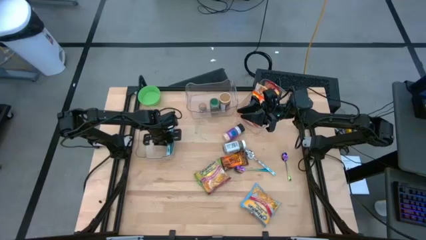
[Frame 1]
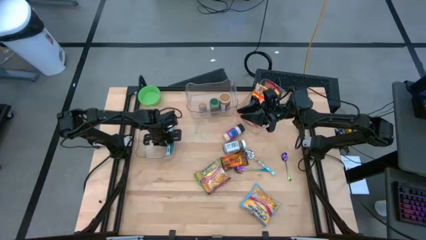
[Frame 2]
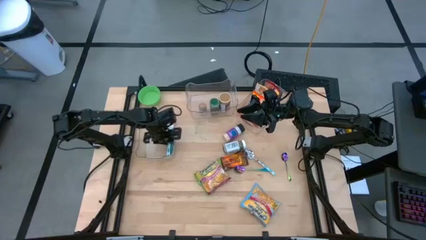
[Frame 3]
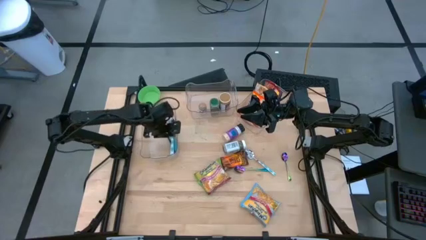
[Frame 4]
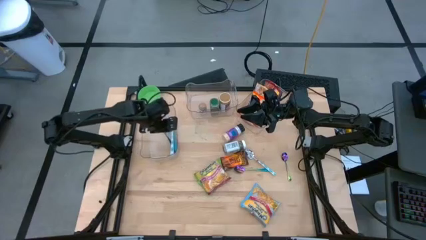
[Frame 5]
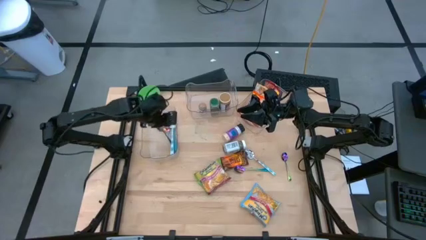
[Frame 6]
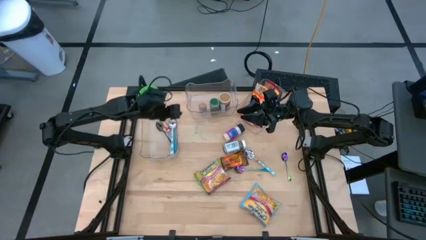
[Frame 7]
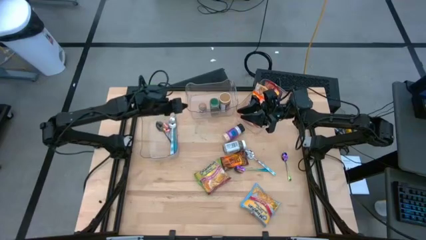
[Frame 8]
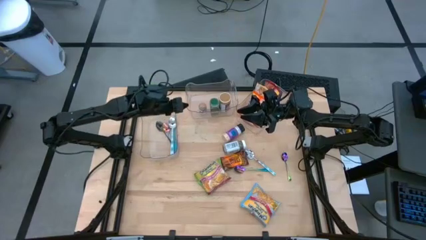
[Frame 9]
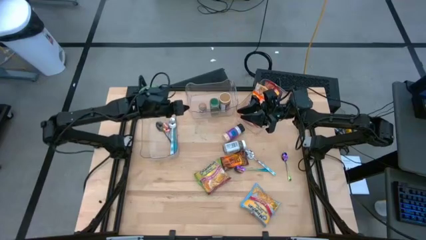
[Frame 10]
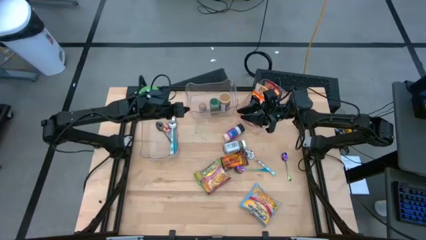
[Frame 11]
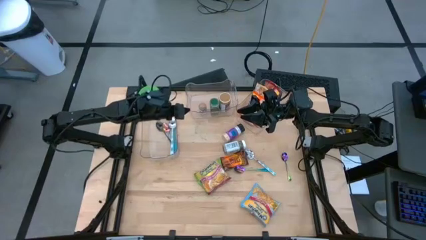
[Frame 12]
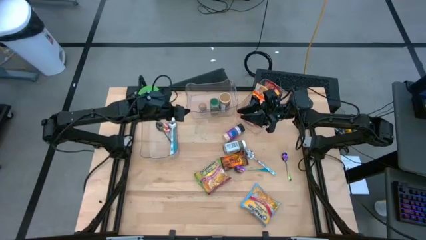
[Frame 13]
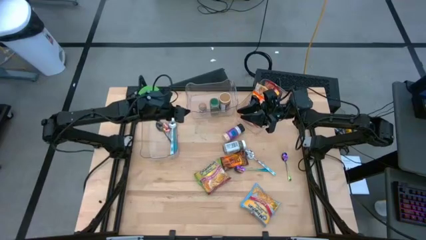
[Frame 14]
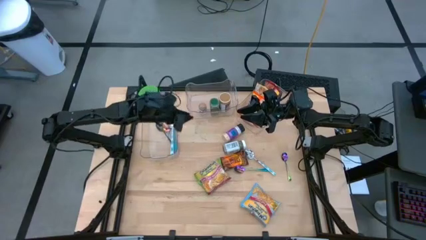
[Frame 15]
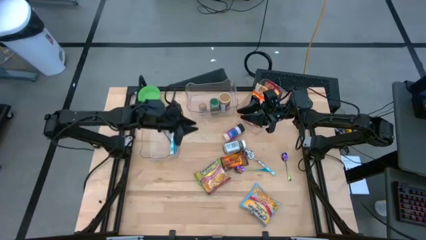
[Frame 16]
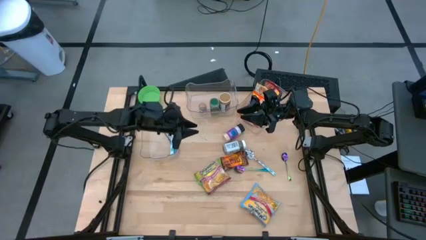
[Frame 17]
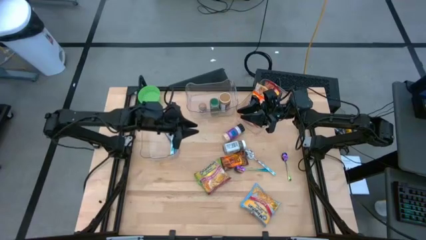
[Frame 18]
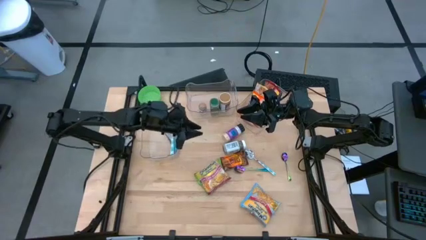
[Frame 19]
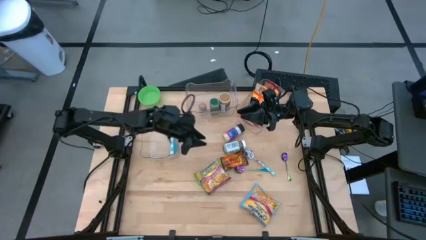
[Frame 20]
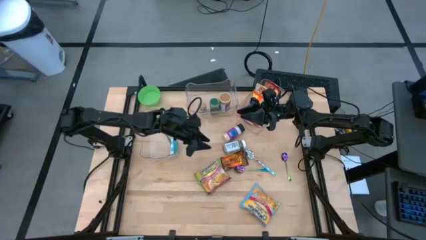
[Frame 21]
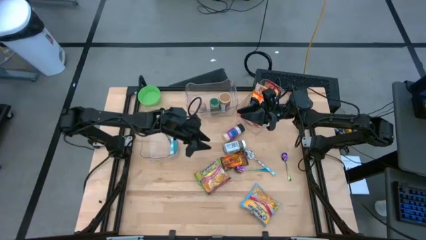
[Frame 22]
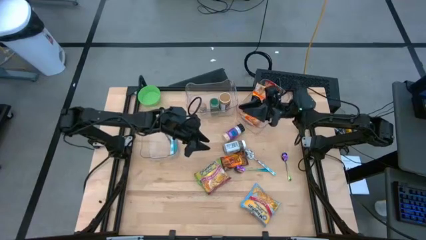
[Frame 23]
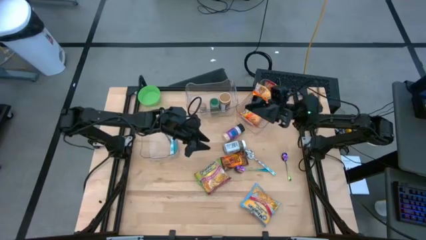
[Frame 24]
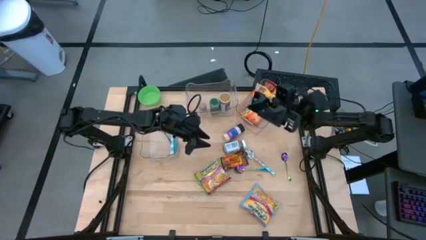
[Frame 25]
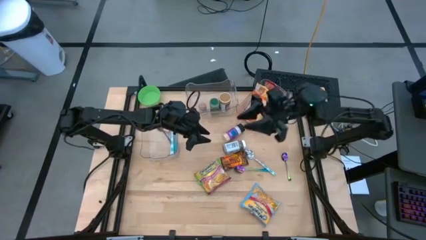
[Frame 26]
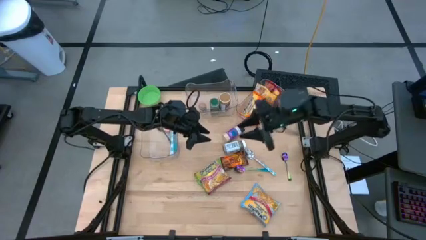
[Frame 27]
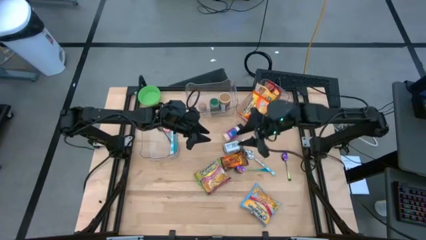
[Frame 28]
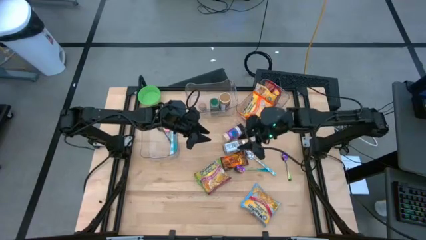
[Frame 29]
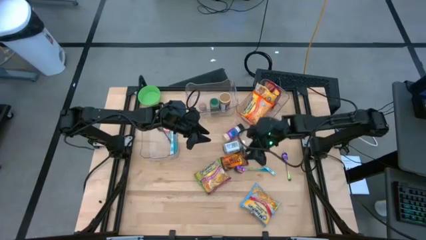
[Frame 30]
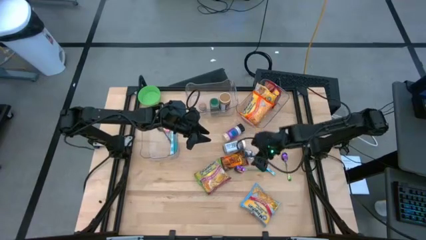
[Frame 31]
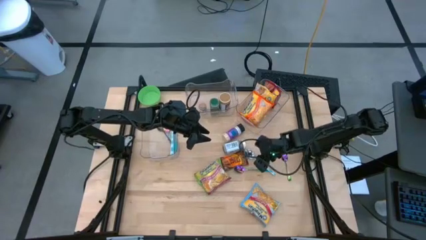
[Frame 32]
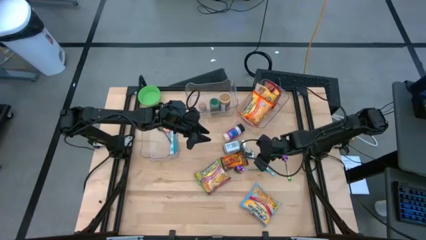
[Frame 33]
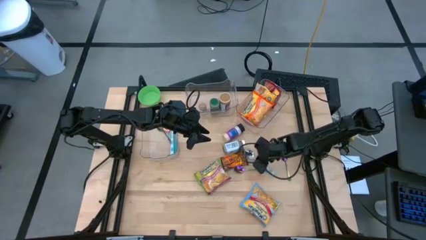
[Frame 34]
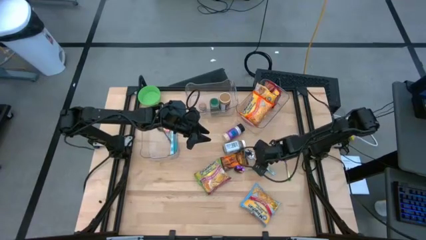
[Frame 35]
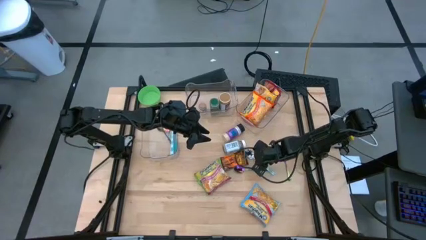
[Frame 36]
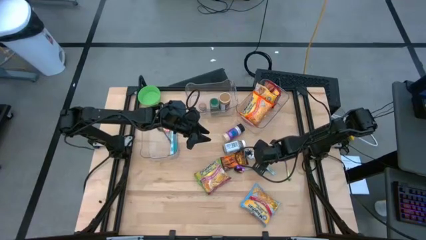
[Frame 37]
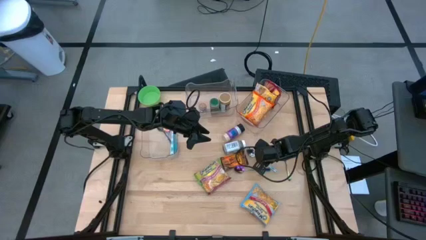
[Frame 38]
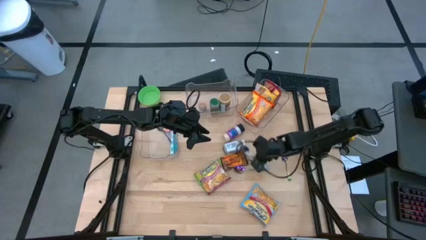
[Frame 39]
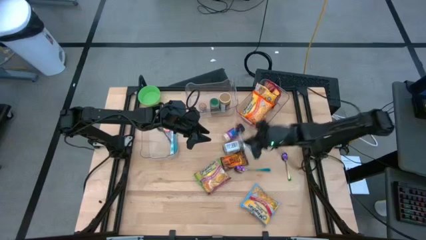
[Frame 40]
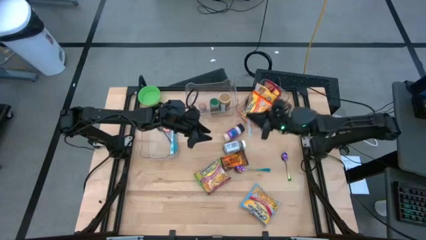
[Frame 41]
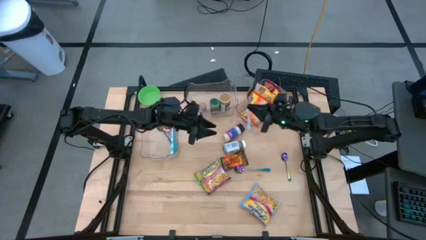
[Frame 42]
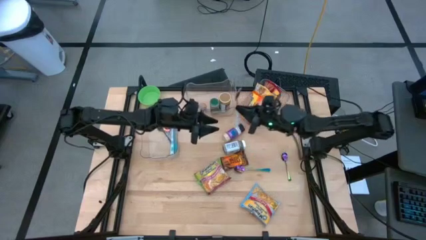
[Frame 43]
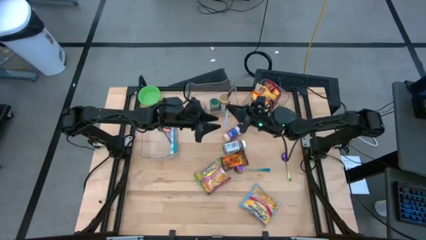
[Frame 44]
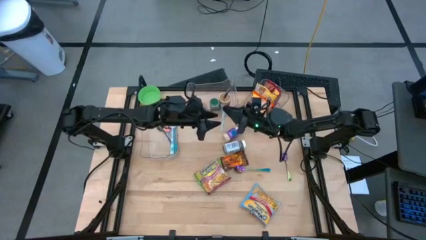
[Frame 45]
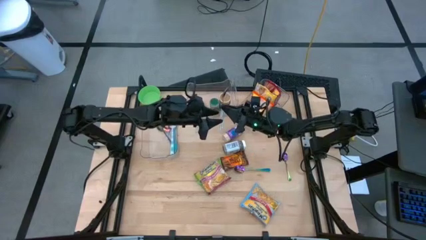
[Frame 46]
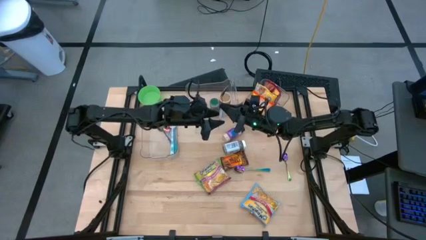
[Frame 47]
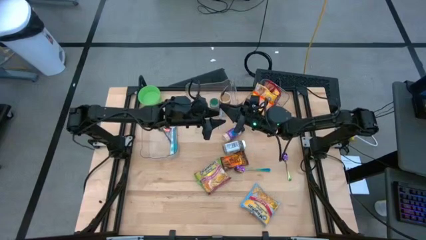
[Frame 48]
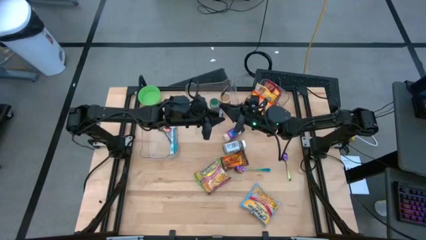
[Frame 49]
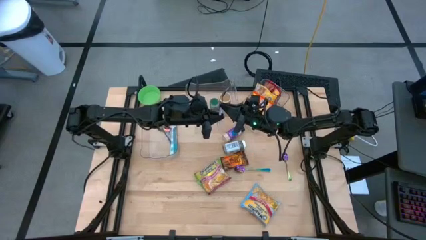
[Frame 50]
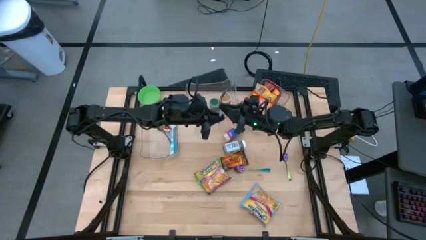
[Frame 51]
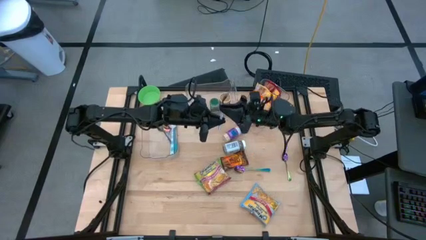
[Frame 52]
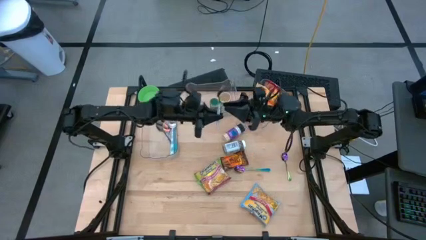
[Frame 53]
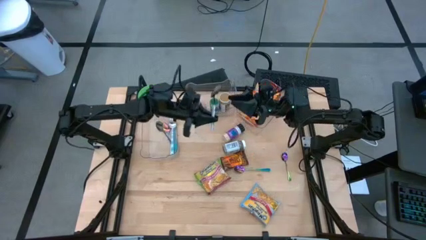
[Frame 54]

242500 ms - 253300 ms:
Task: Pick & Place Food Item
Put the white patterned spoon into the left transparent bin

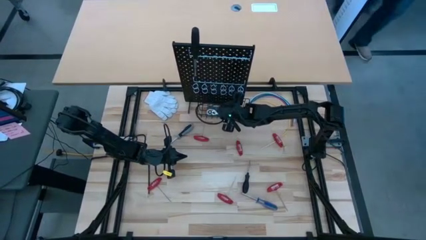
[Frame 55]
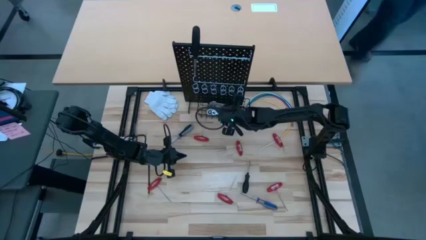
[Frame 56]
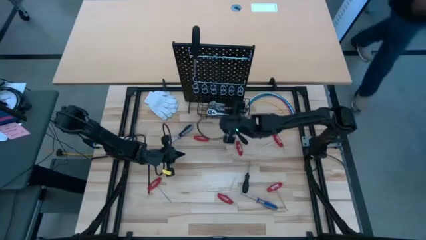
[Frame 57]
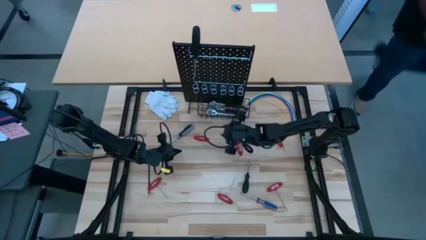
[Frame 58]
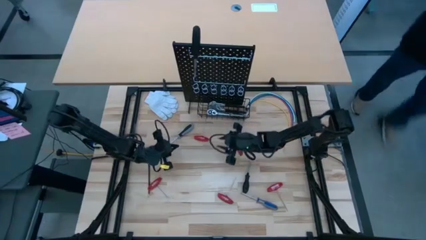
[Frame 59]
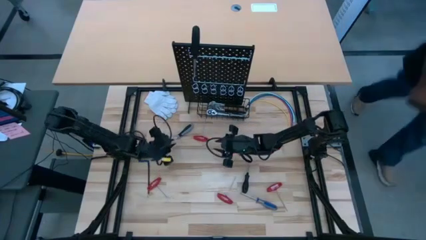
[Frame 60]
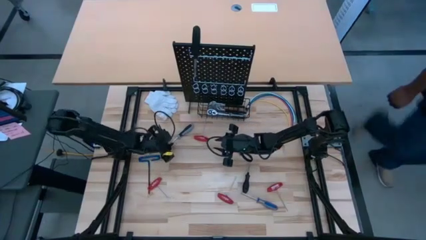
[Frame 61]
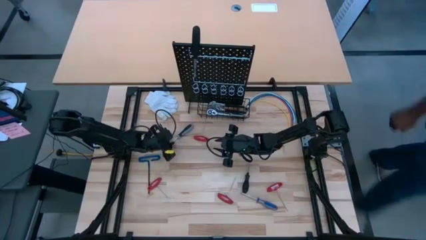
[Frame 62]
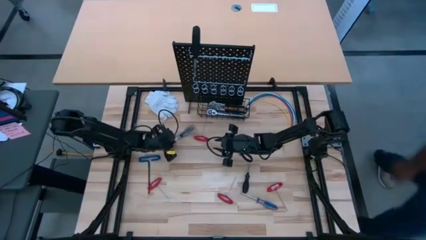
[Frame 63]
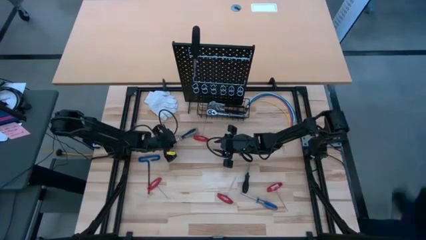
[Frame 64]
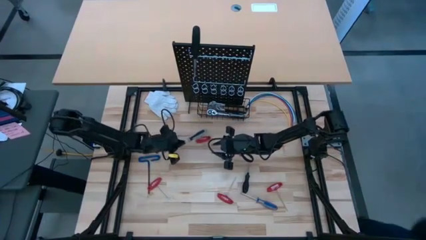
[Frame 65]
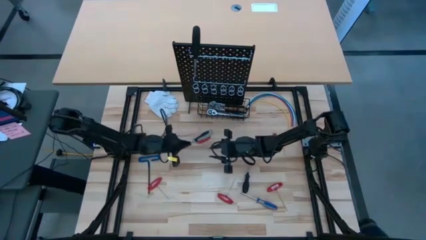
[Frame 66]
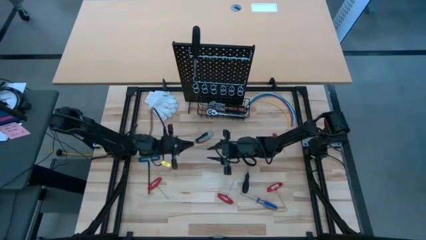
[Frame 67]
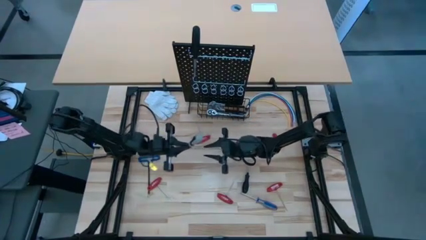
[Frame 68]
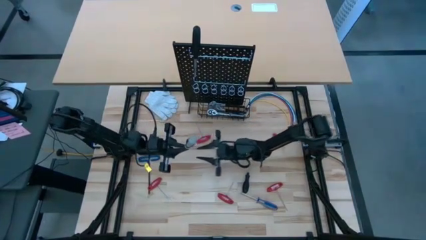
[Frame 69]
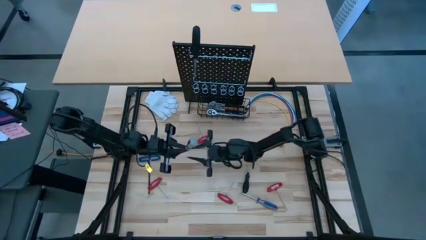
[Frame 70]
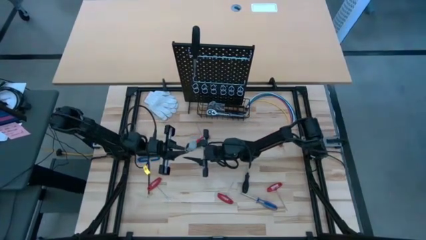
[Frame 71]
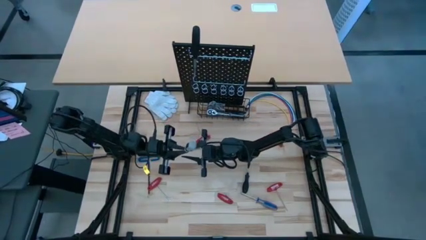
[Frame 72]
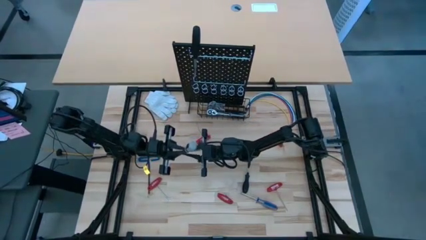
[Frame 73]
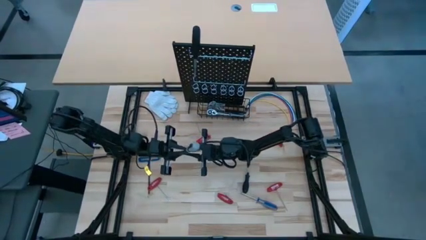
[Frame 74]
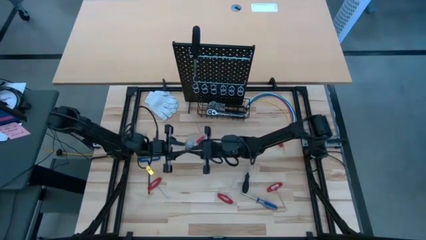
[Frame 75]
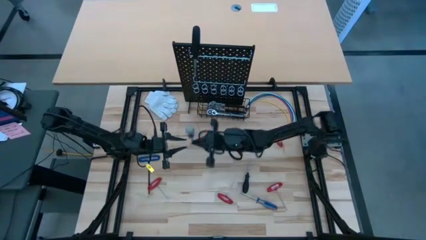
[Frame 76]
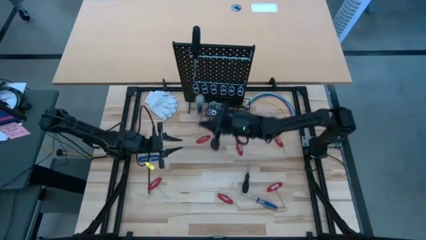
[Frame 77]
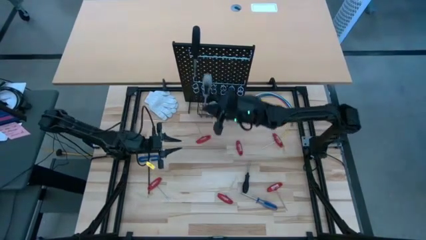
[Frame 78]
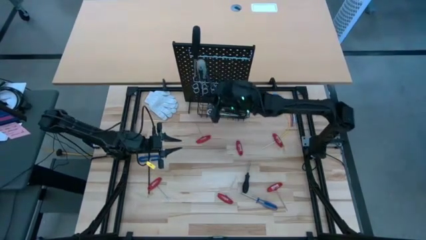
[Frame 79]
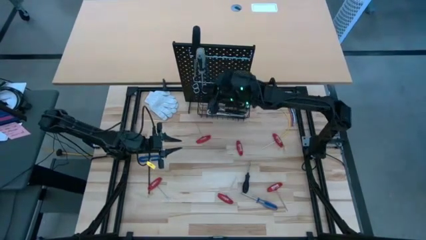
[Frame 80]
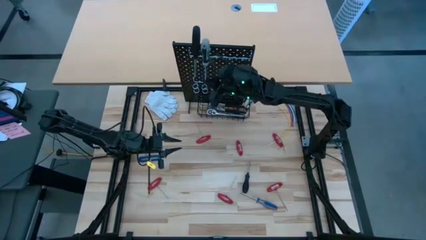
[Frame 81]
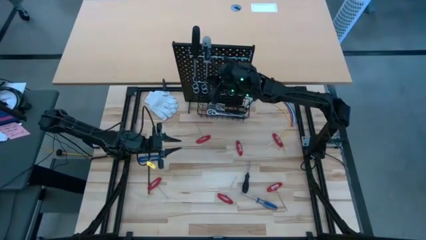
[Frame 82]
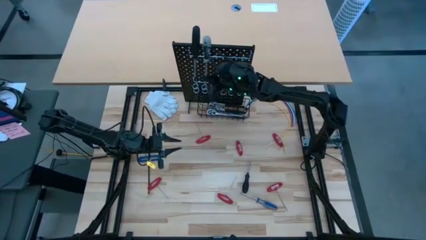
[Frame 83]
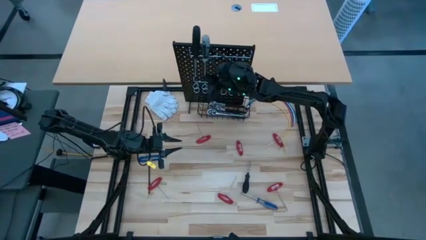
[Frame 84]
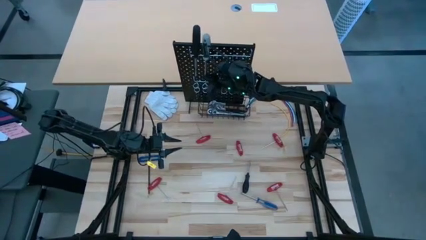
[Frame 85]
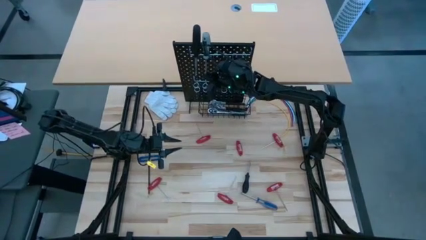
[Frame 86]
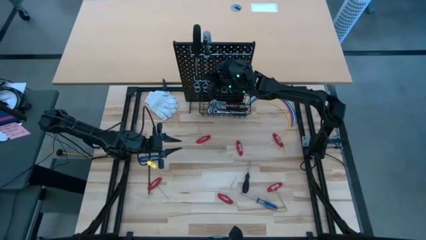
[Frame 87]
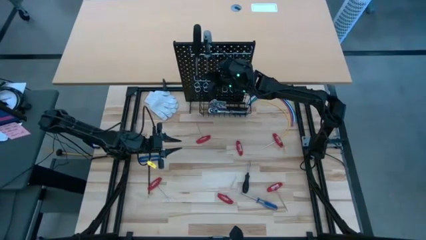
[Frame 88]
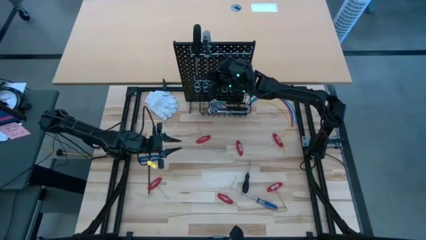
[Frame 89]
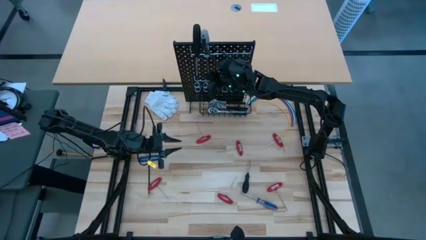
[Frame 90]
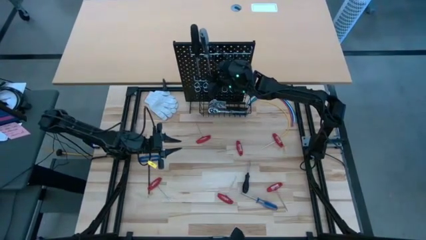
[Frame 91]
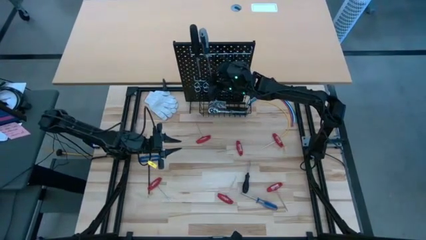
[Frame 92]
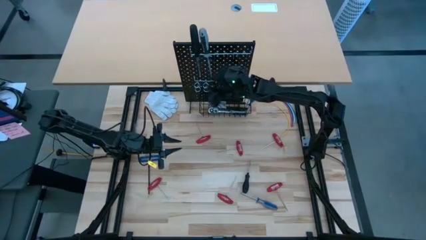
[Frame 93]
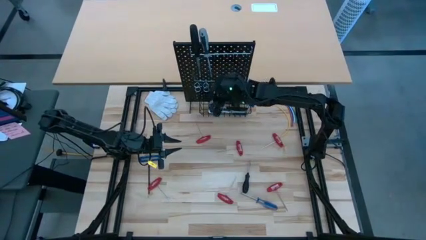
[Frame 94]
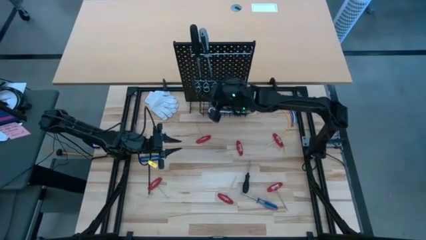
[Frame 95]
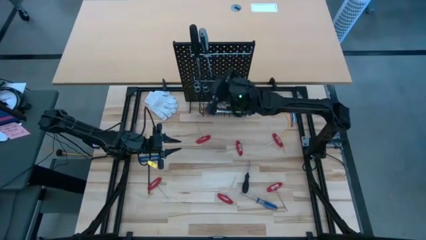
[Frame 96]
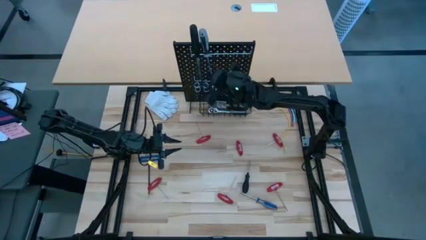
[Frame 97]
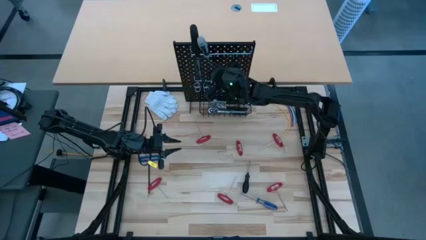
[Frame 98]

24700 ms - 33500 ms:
Task: Hang tools onto peg board
Hang the gray screwdriver on the pegboard
